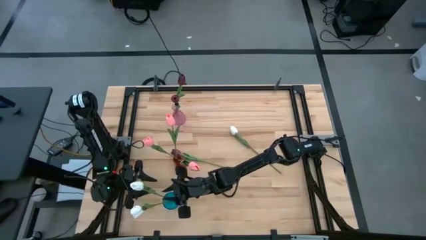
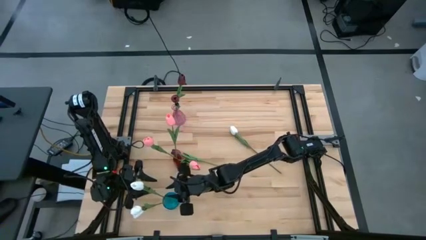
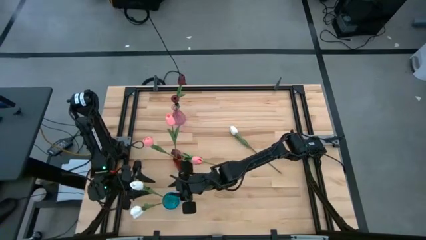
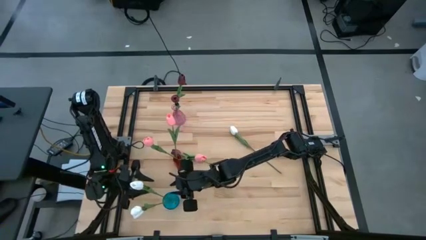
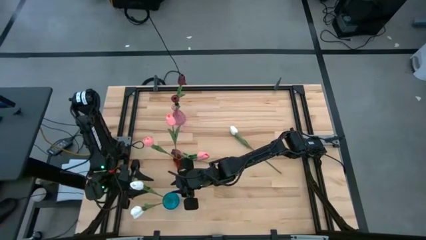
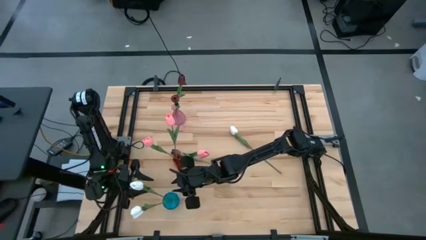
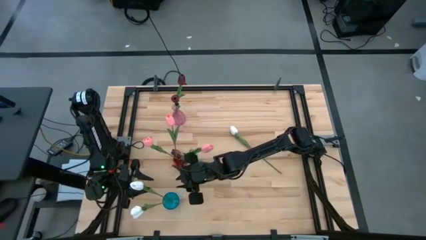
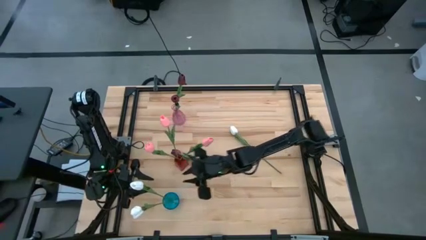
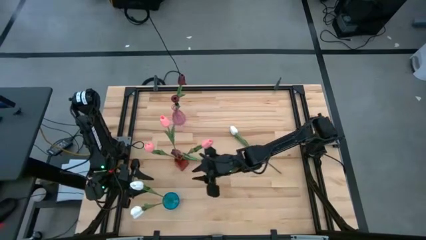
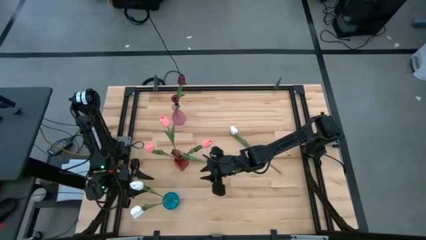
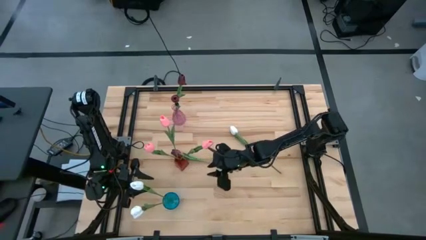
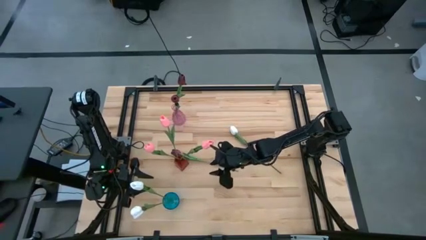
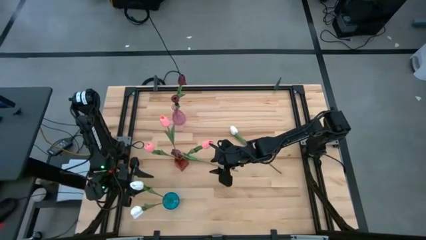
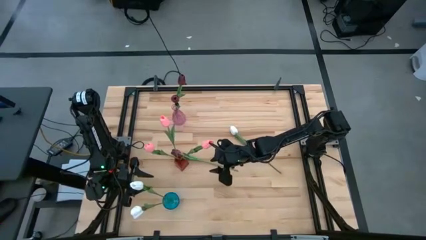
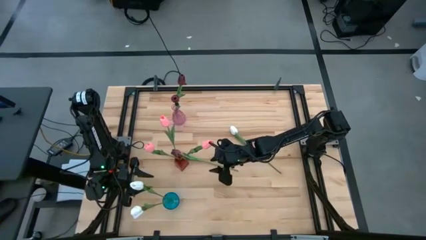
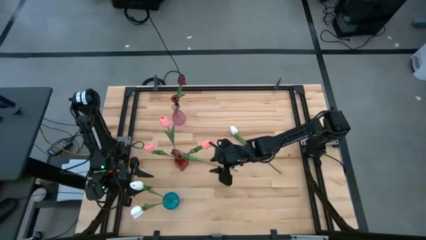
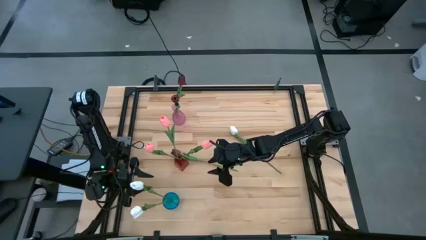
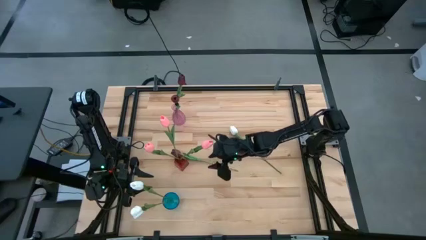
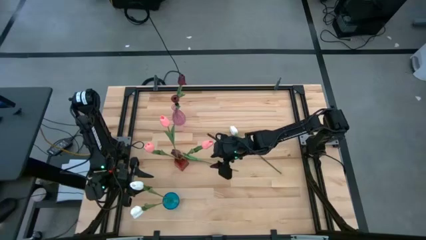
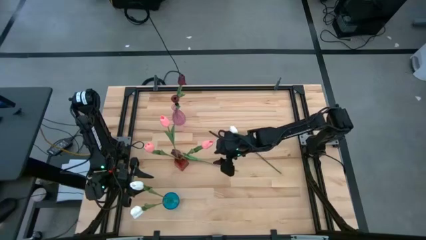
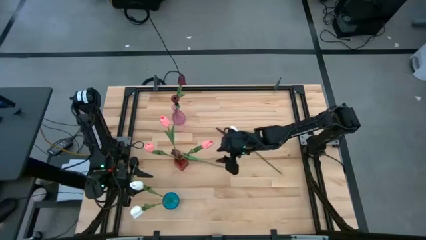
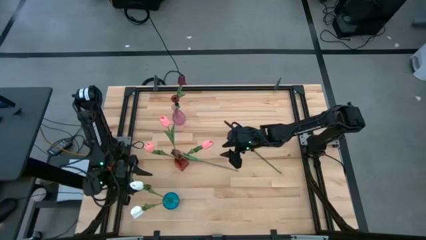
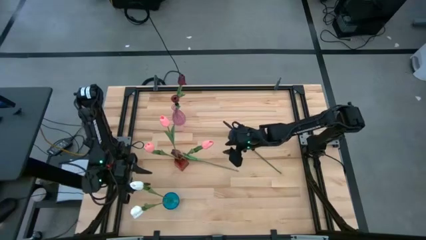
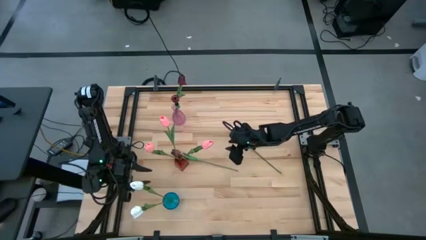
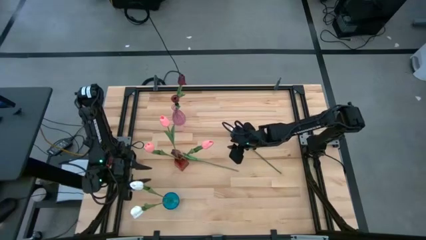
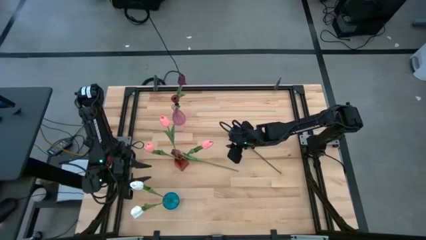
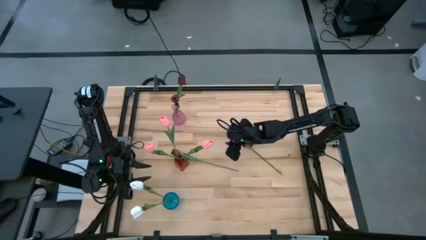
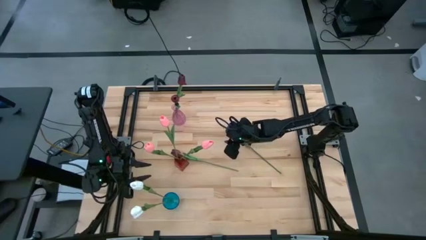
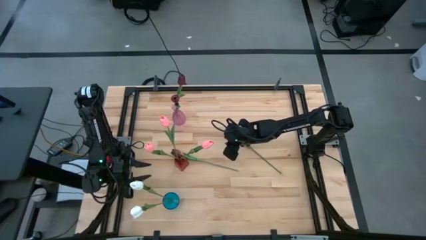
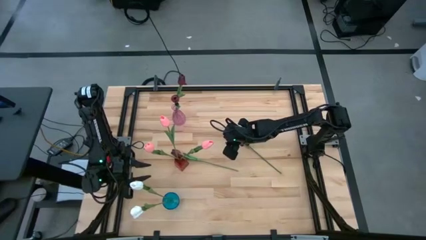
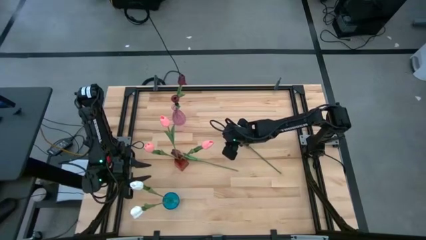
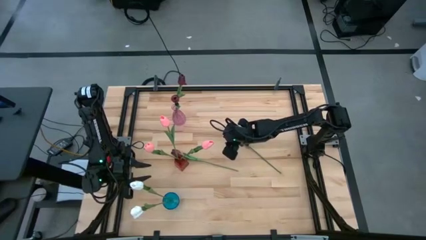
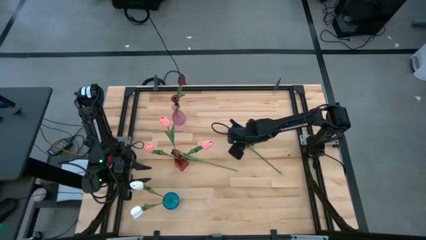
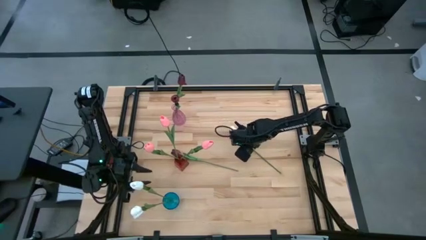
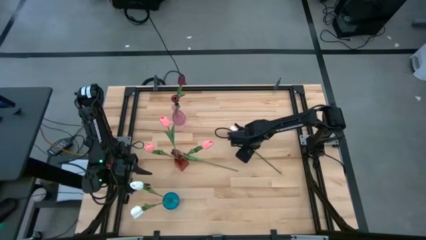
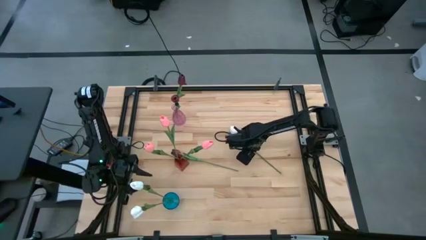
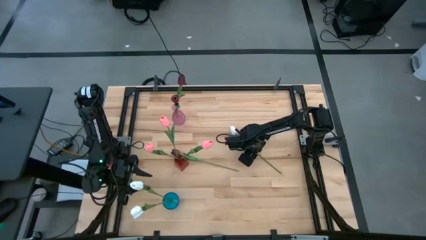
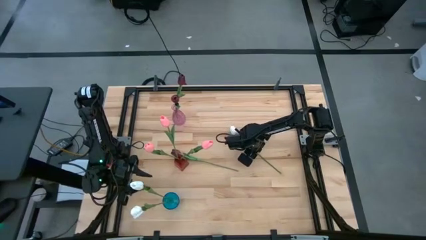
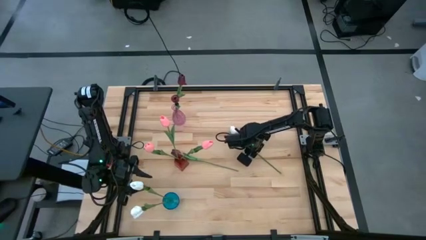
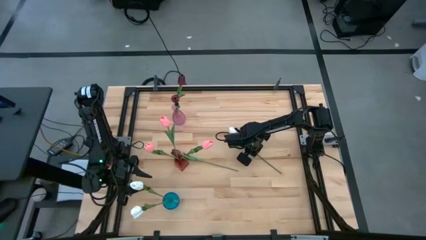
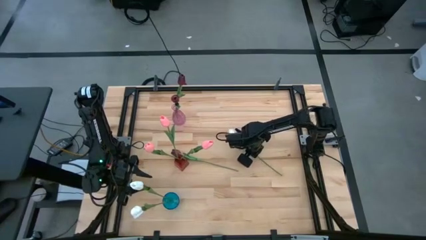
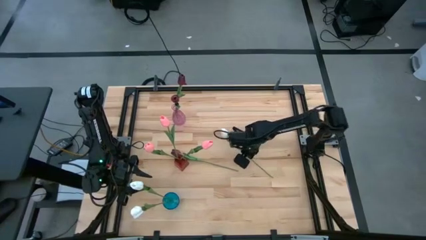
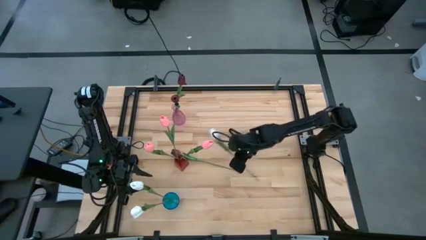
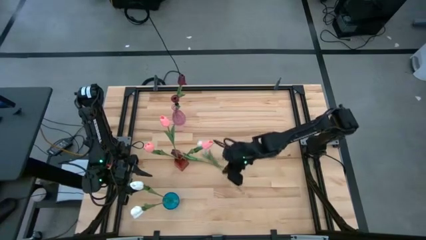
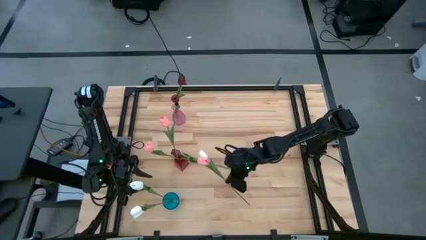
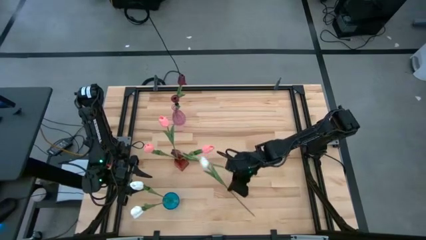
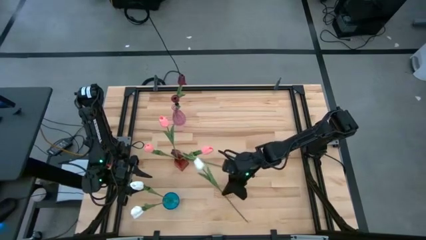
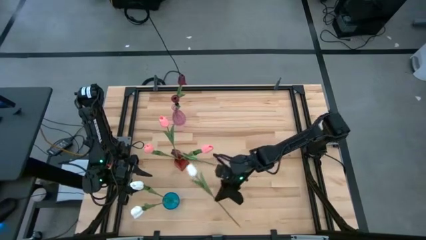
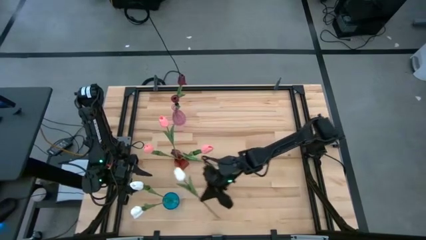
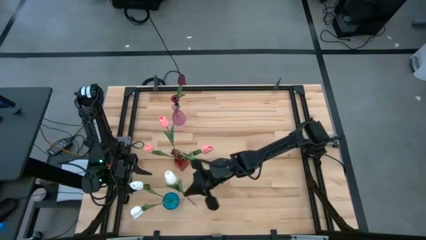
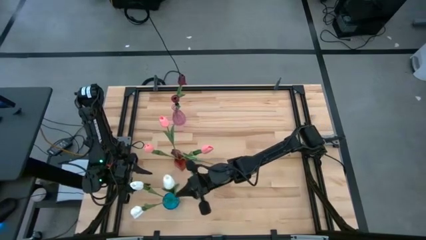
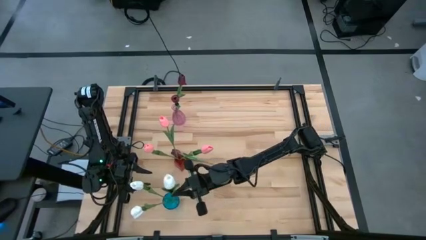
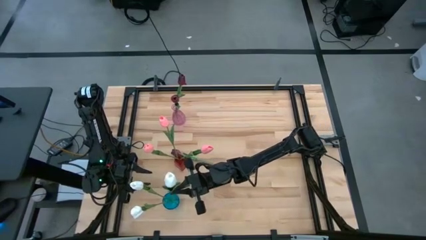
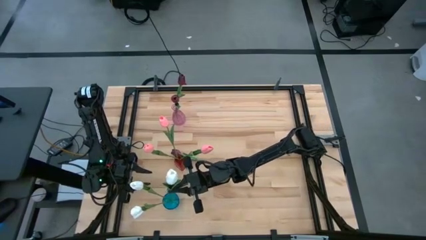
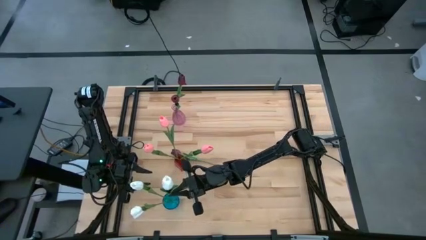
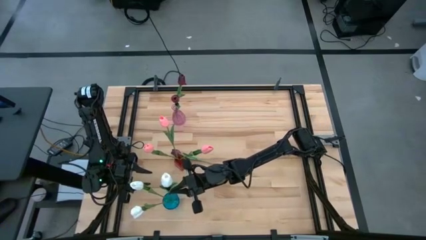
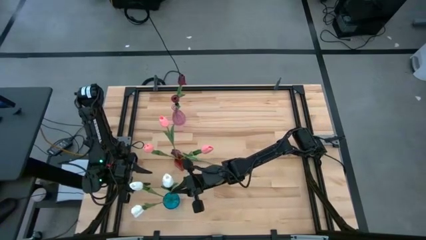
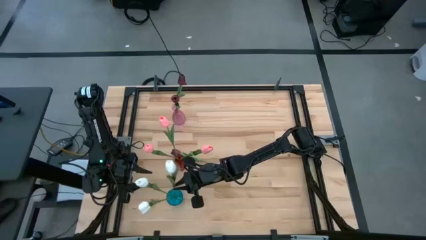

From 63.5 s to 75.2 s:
Task: Sort flowers into vase by color
Put the white flower into the blue vase

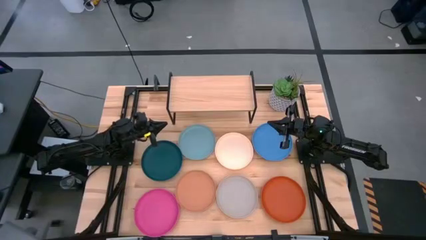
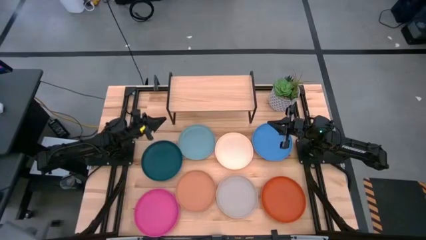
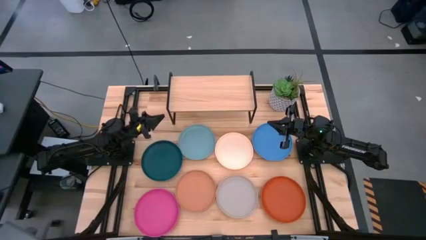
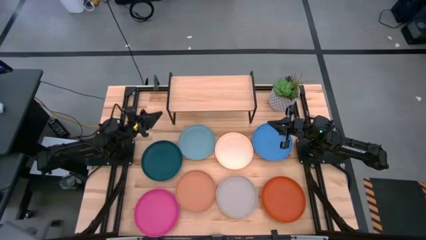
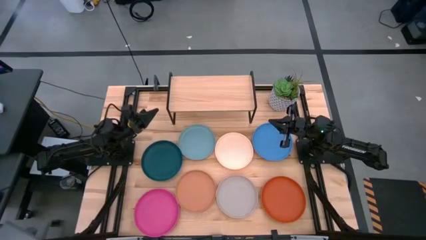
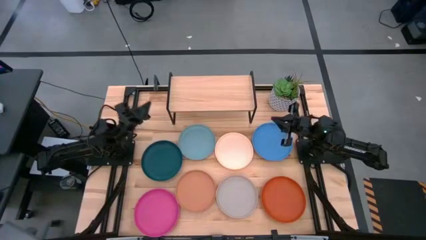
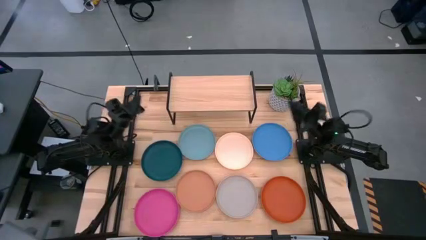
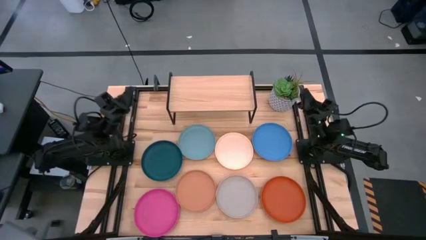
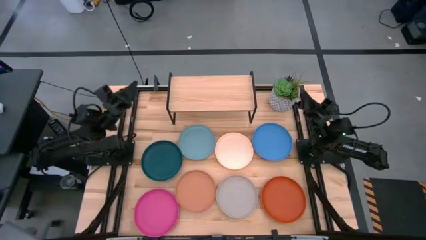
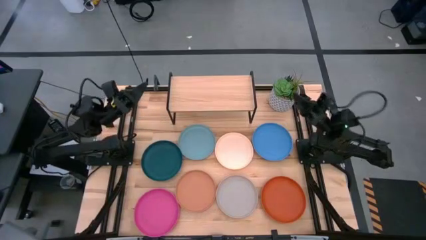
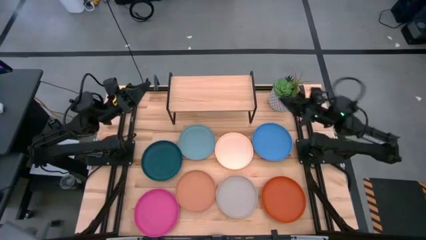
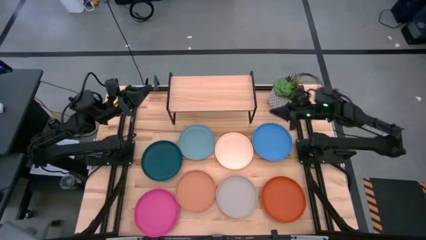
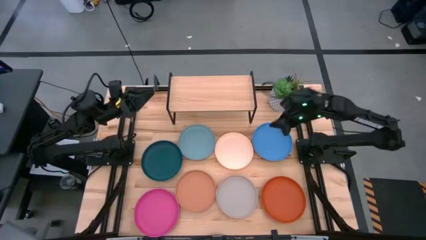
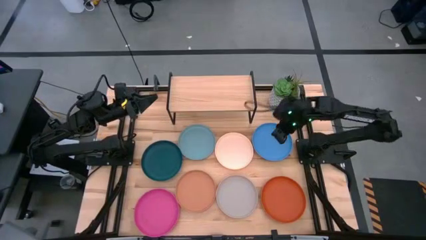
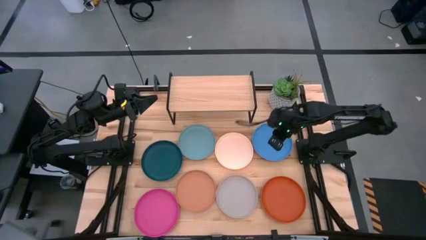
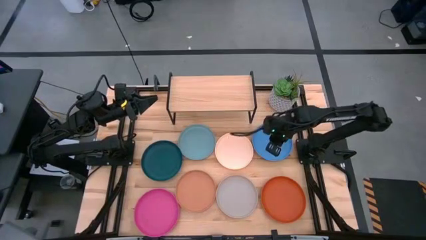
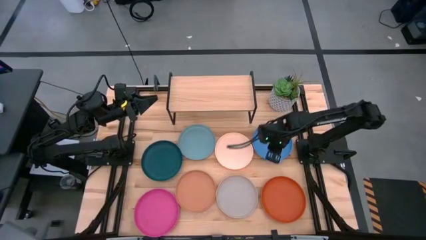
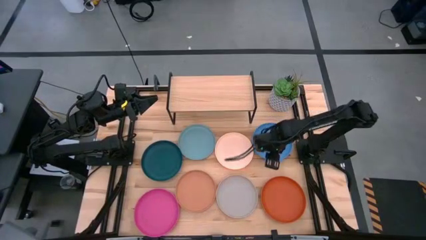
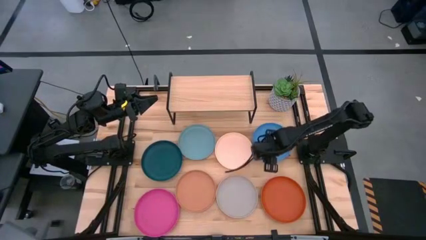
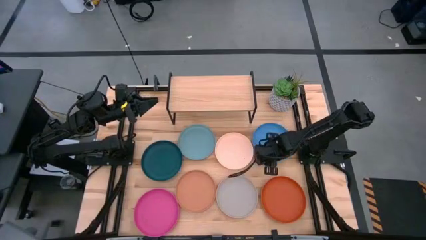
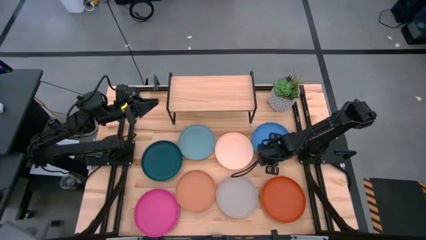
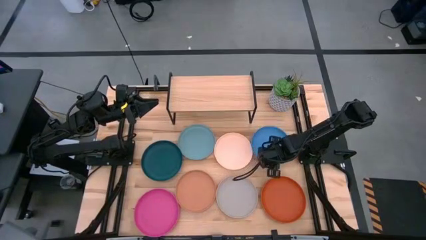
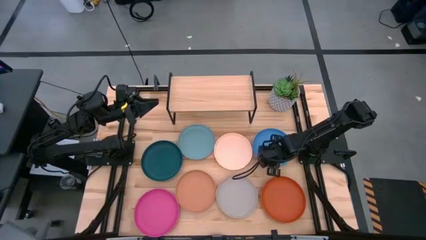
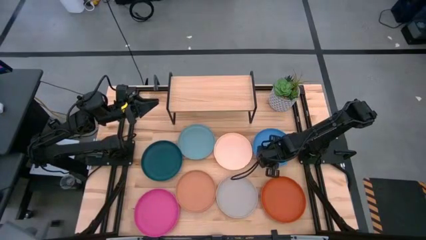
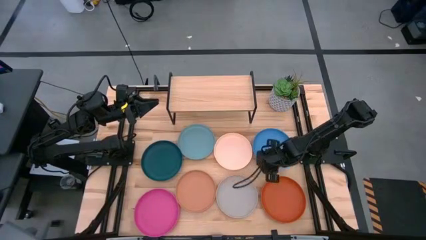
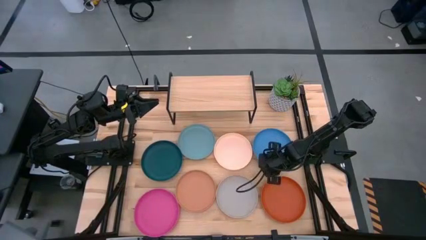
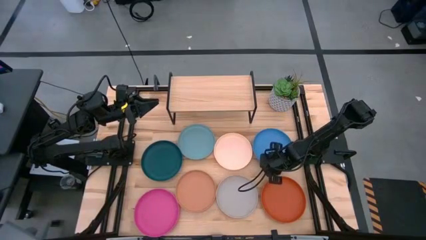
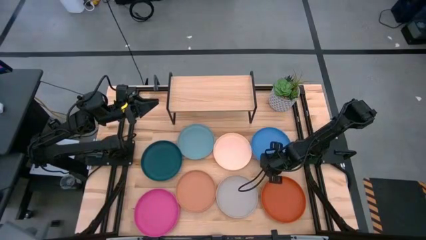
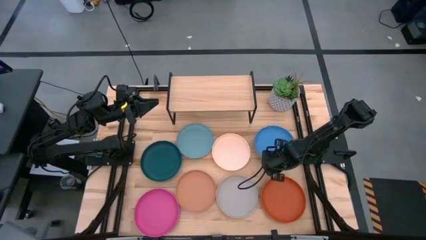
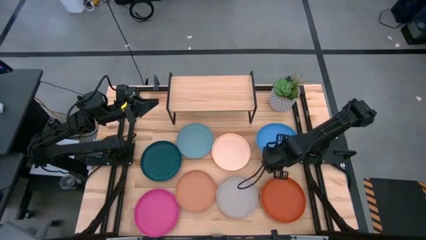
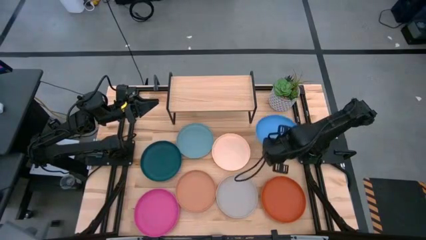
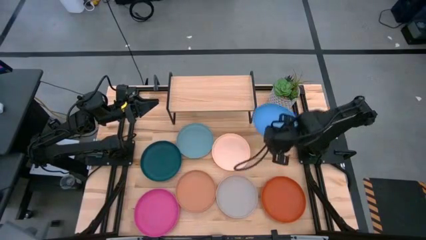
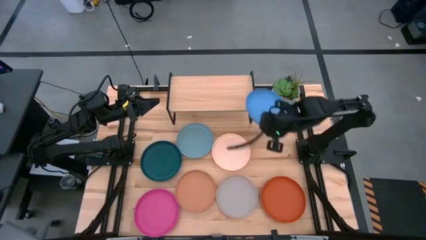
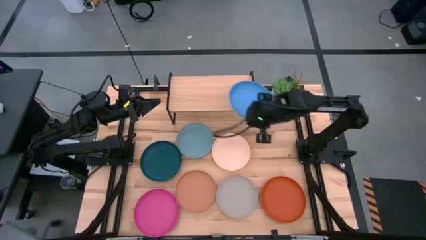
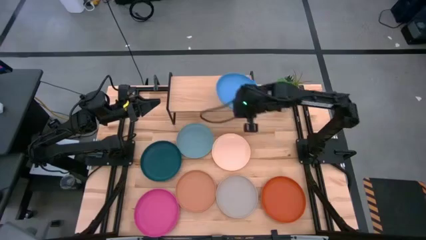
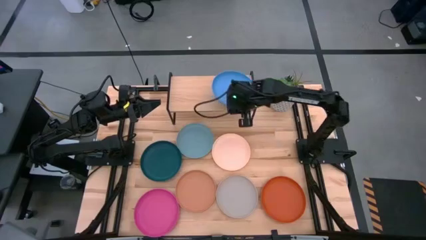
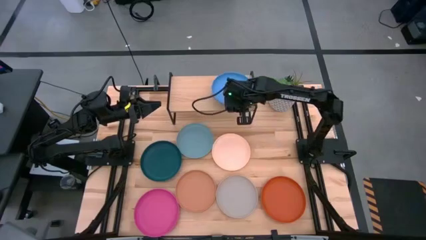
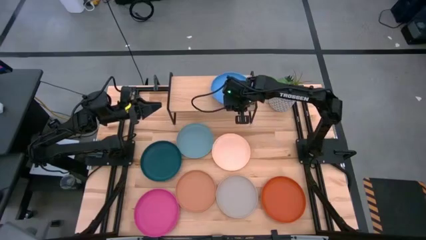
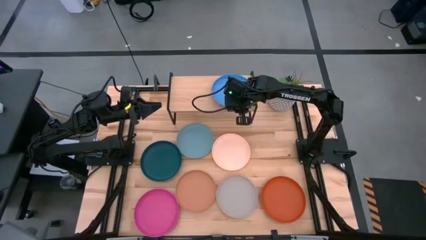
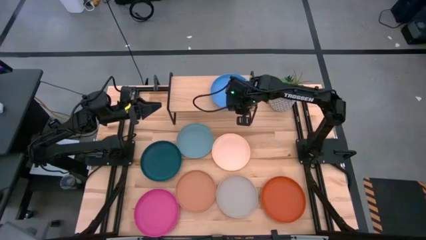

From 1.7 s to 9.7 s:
Task: Place and stack plates onto a shelf
Put the blue plate on the shelf
